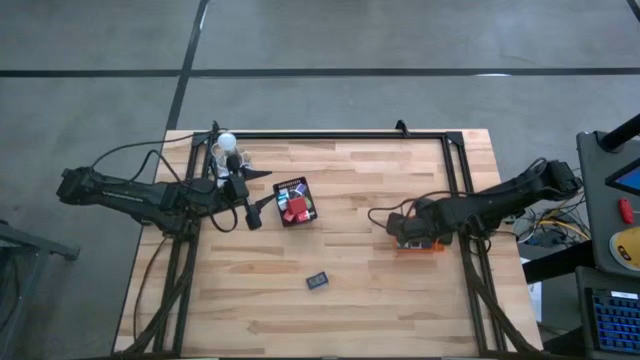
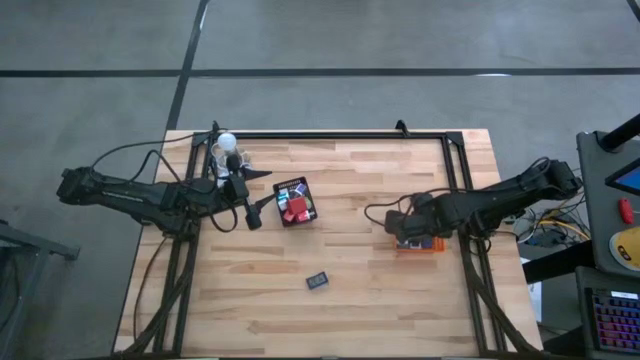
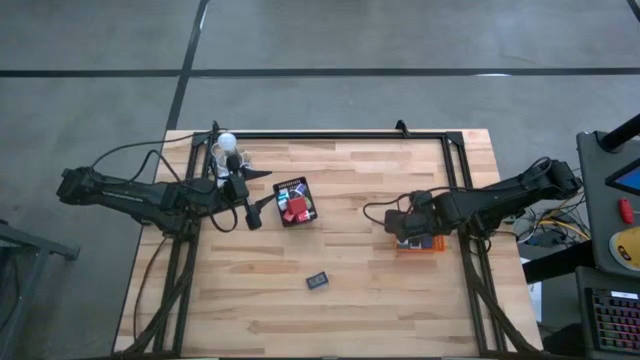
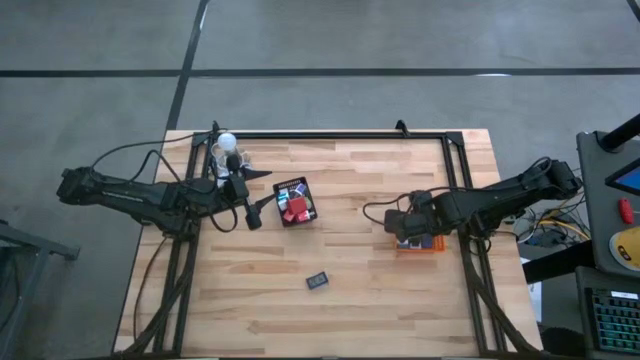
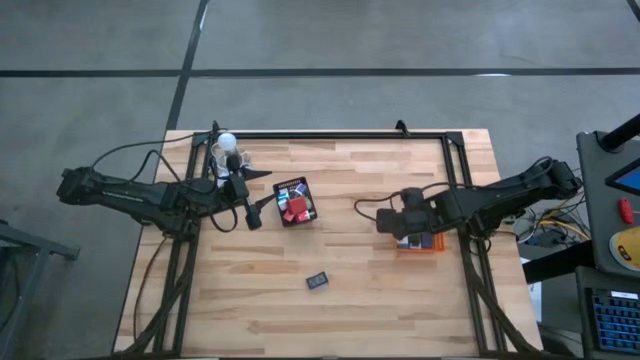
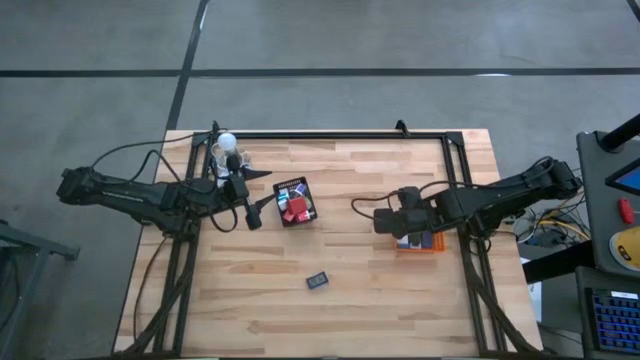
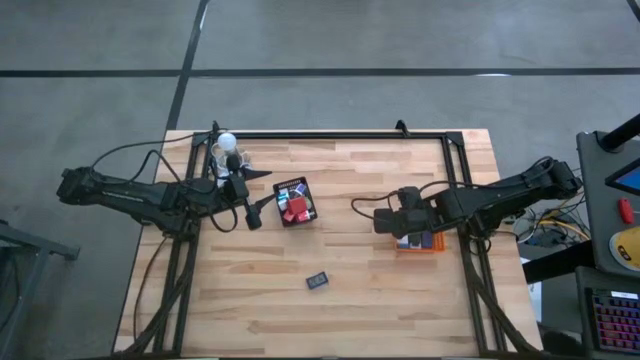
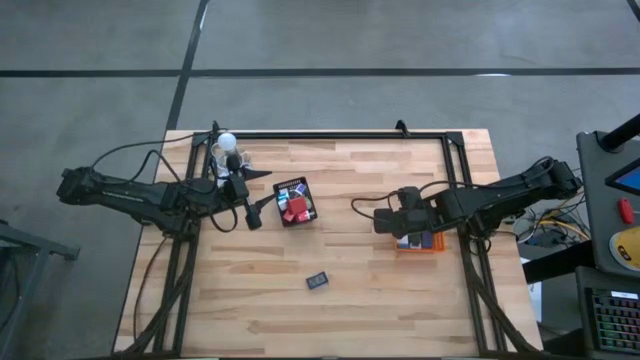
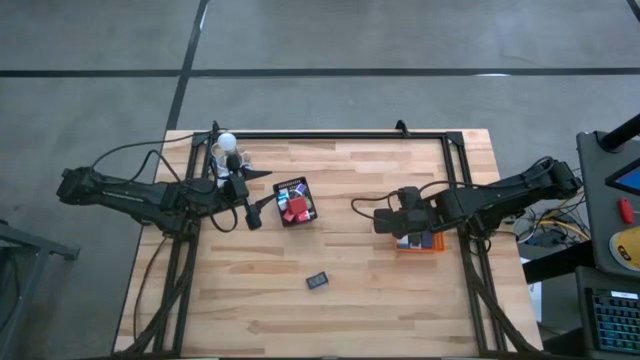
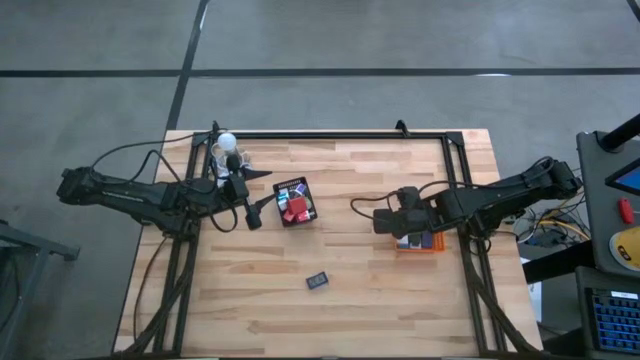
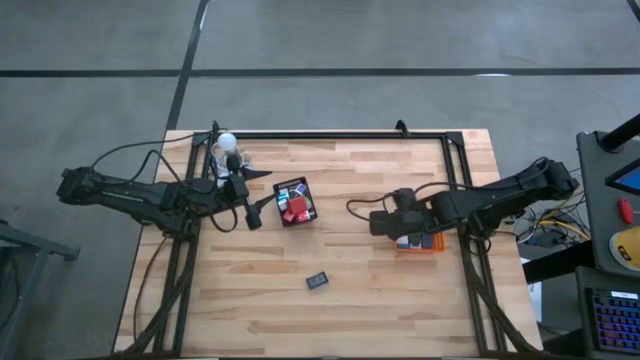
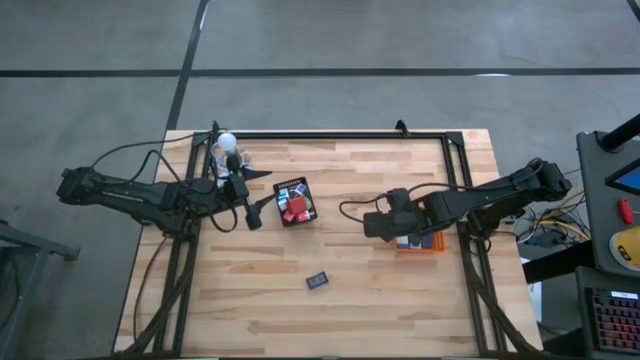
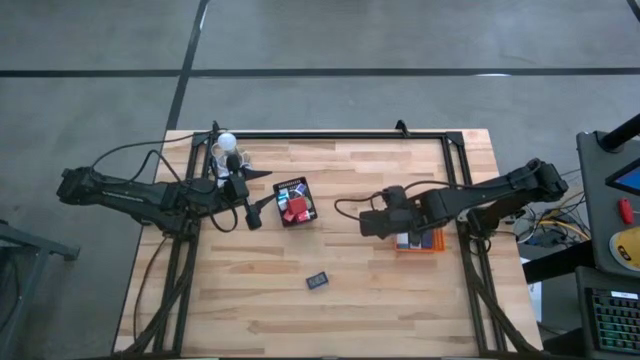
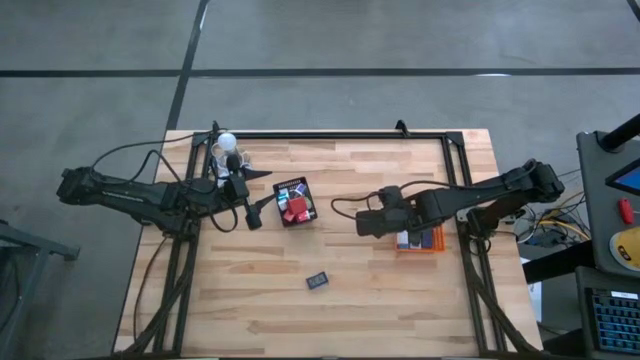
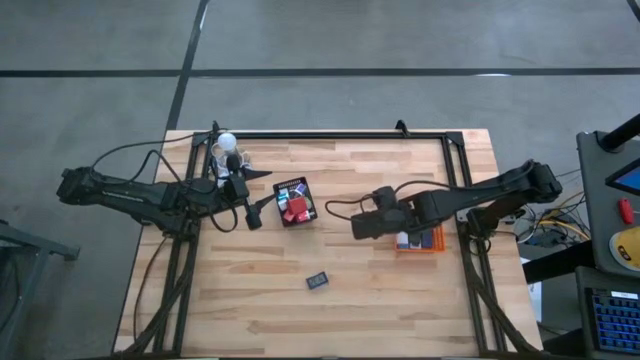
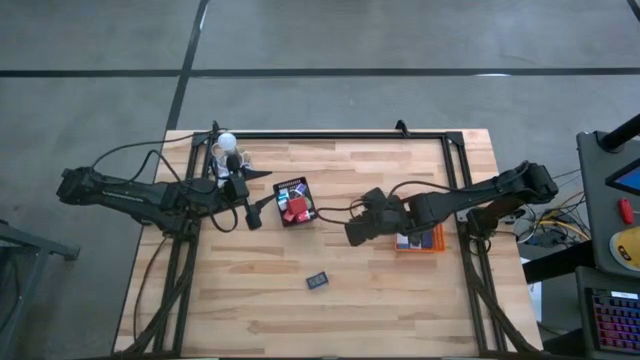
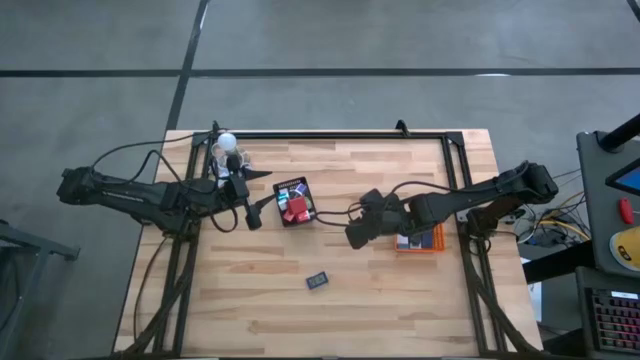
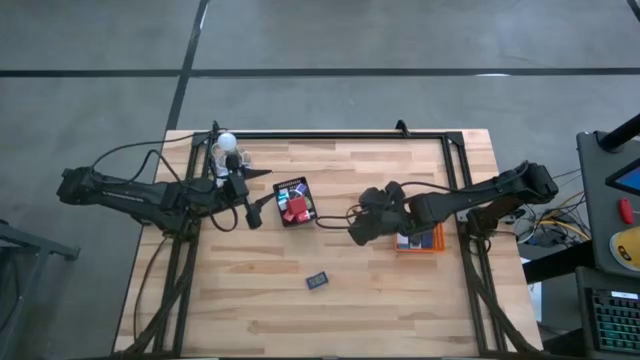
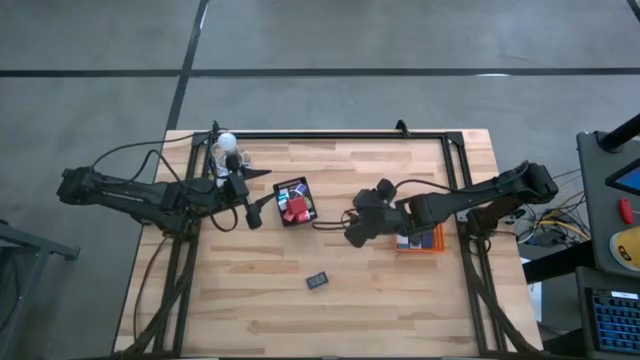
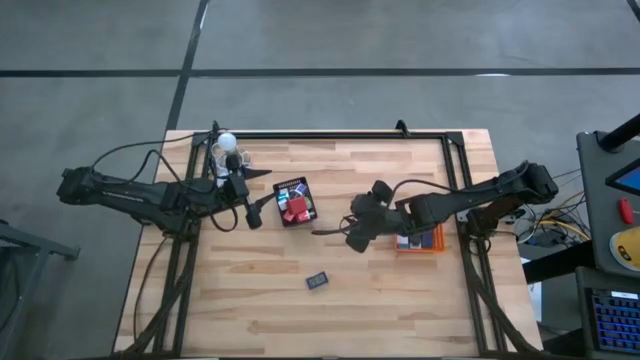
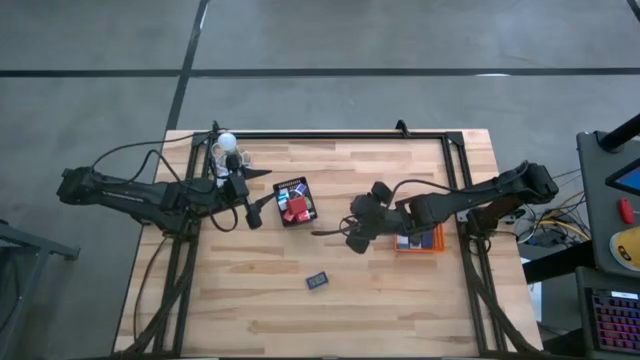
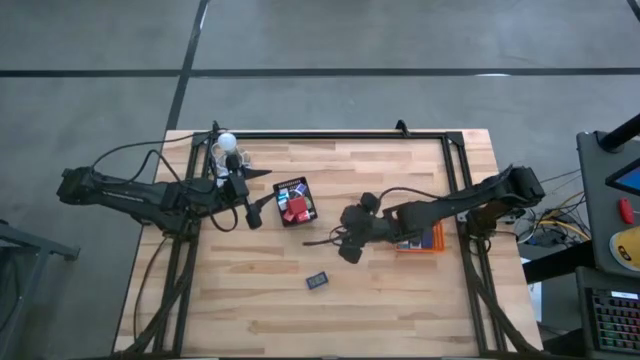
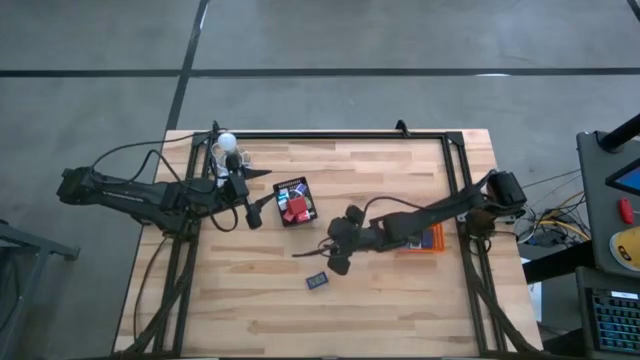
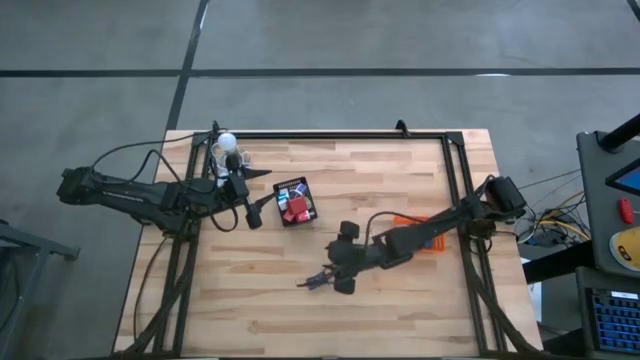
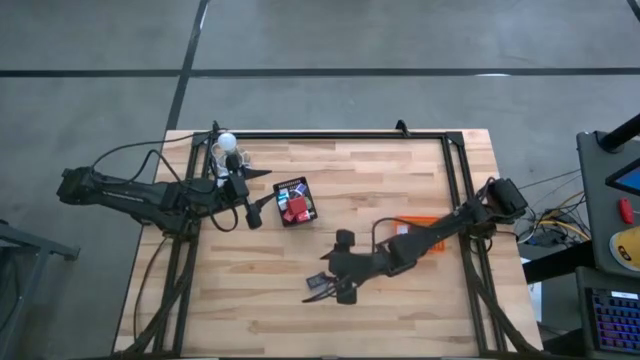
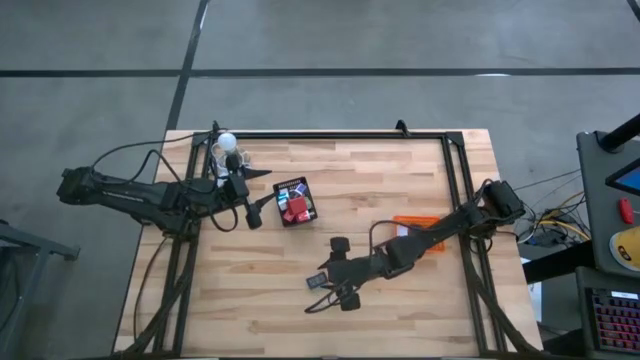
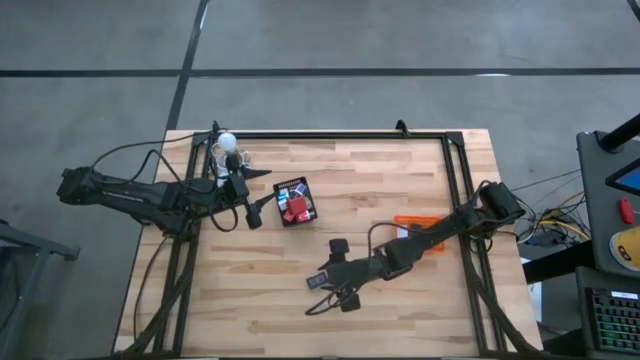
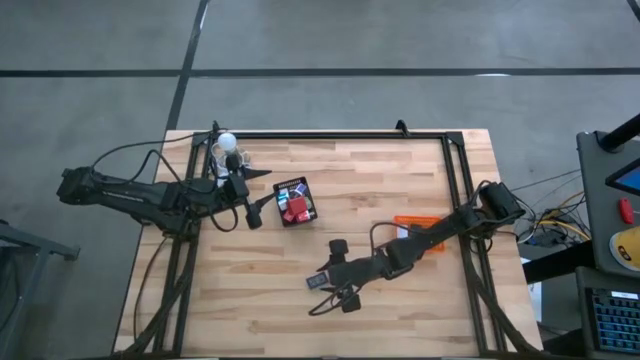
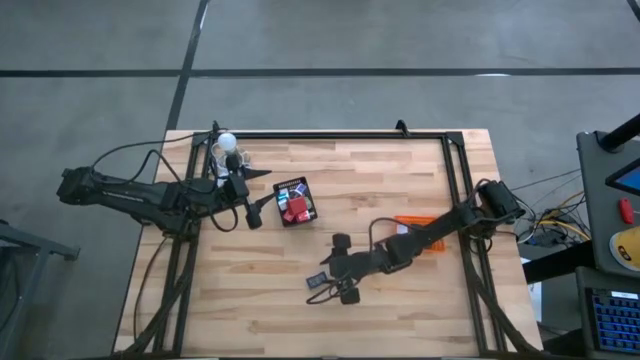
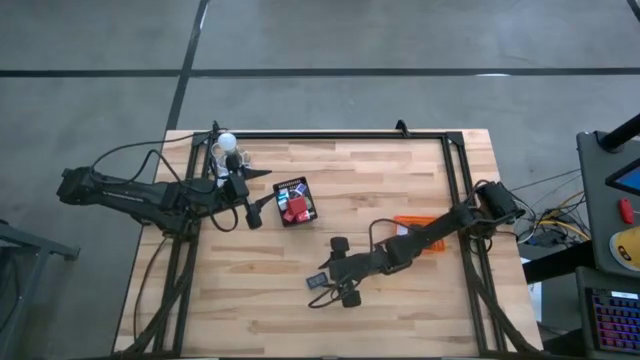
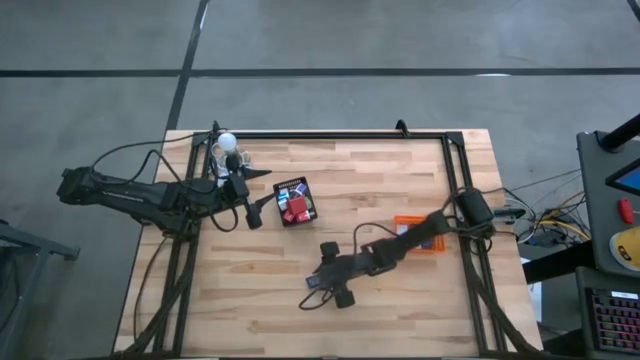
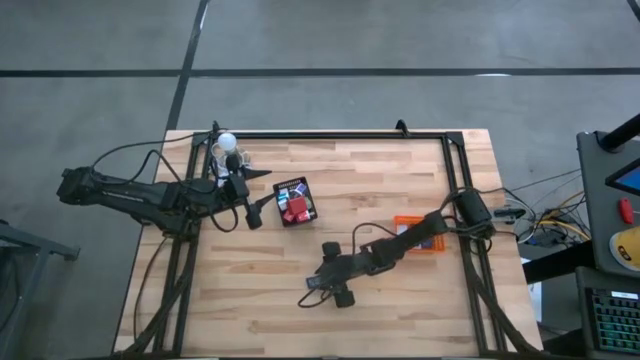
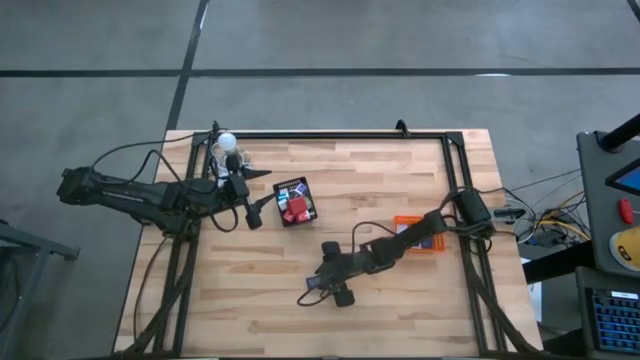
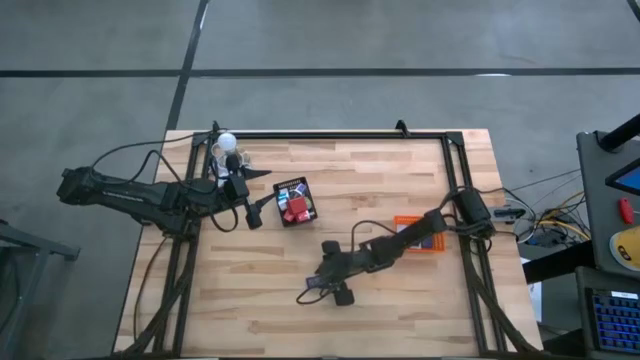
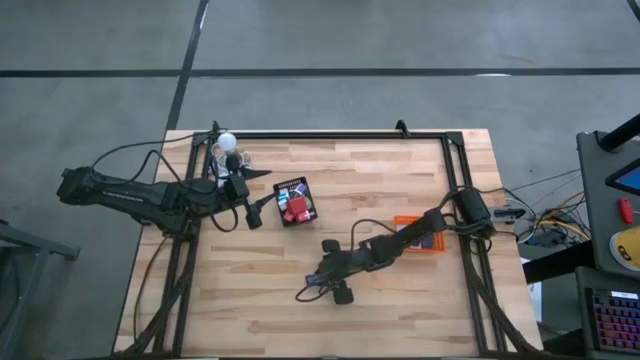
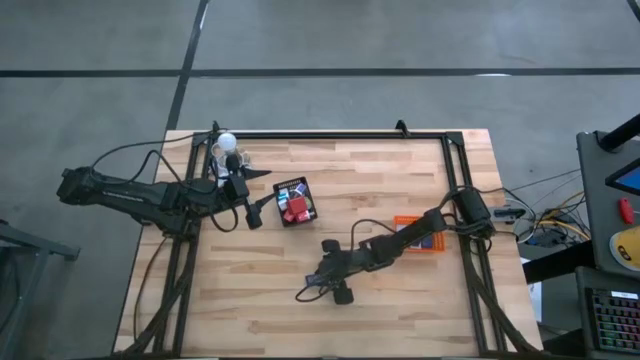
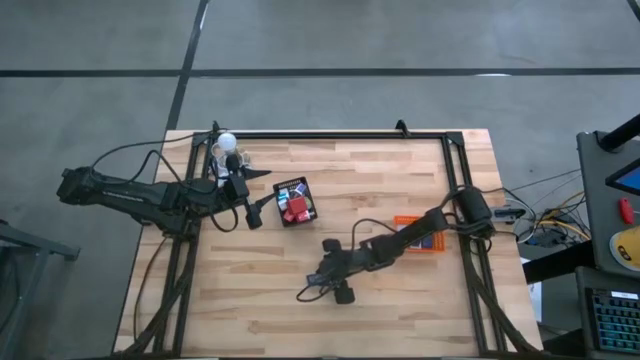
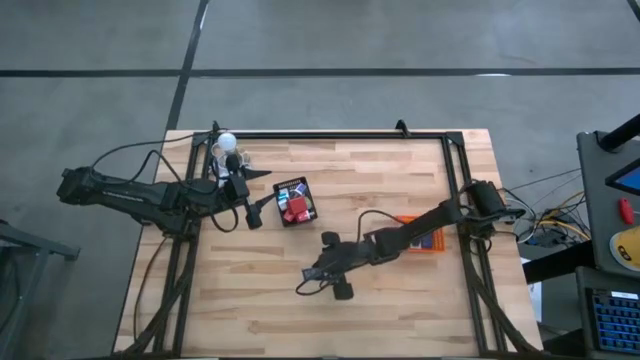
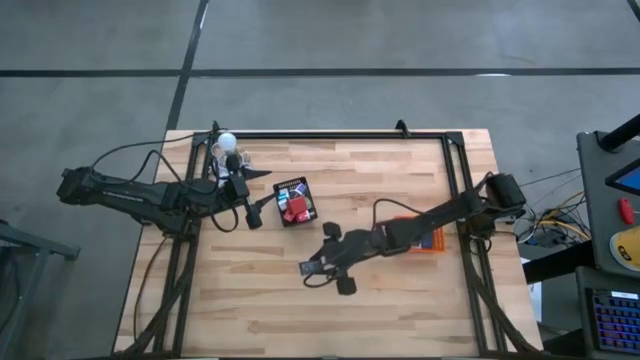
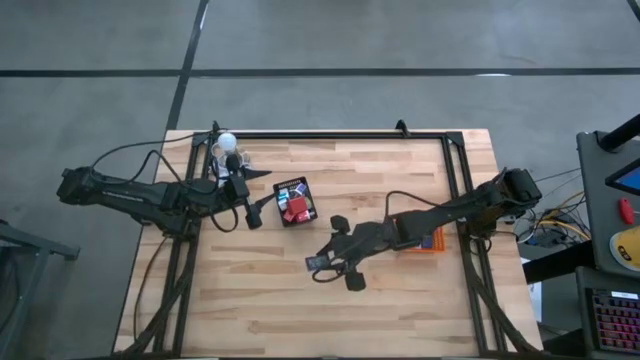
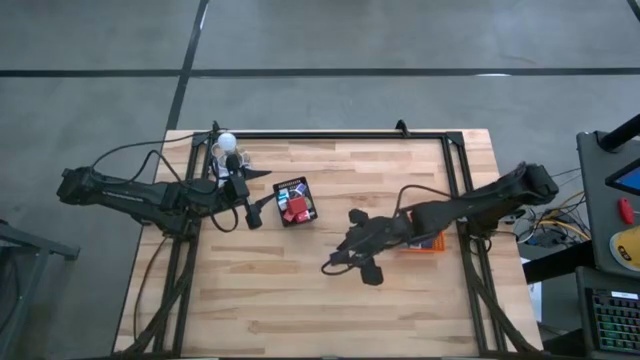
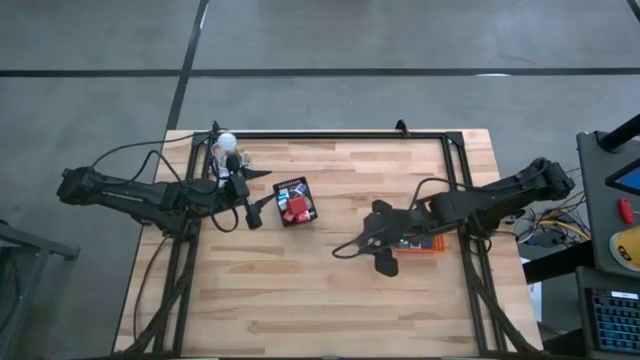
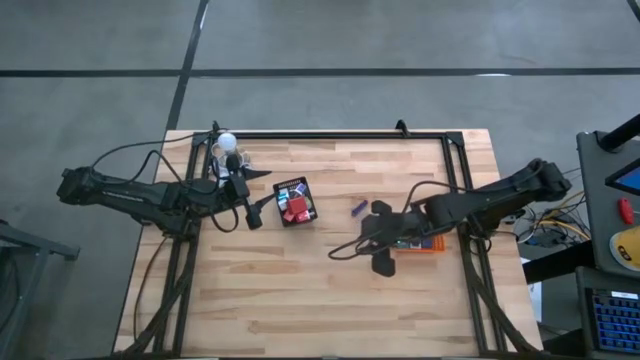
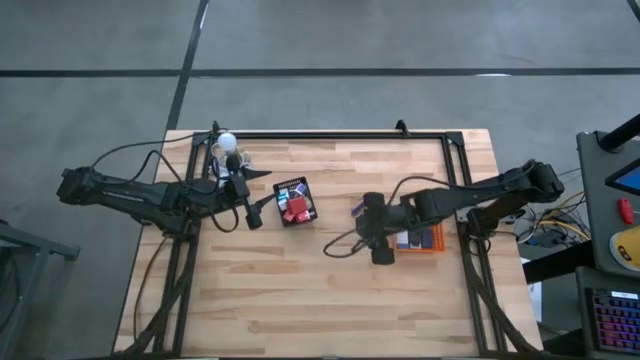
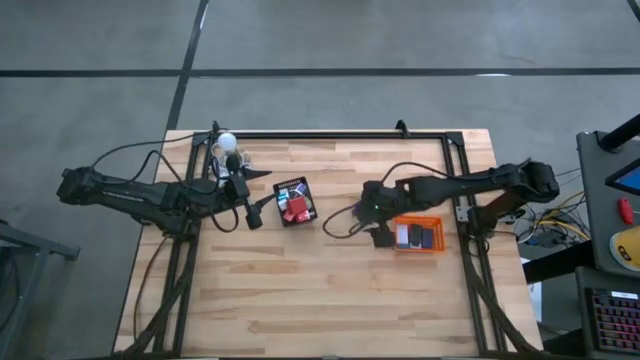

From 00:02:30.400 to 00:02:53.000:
Task: Pick & Place Office items
Put the dark blue digital clock in the orange bin
